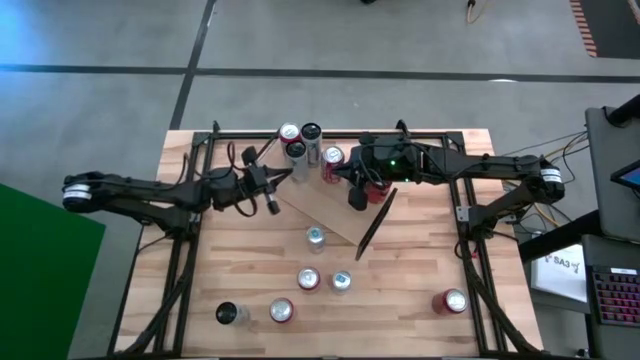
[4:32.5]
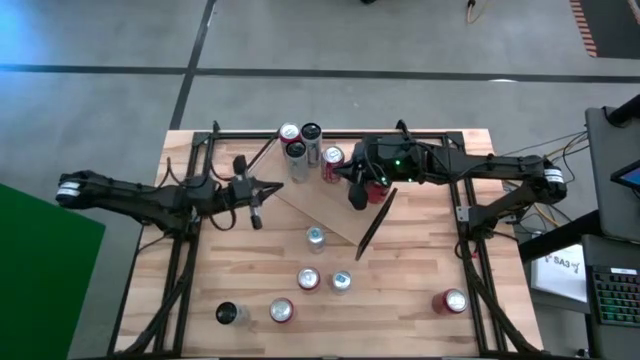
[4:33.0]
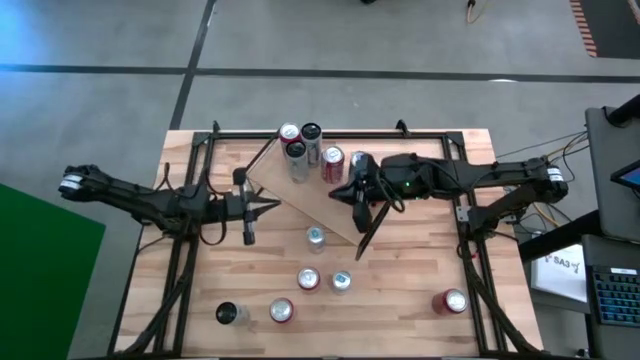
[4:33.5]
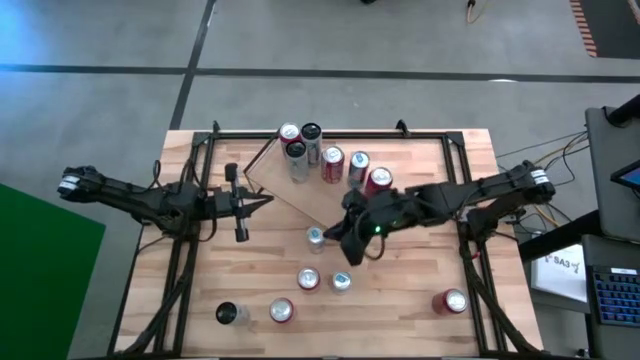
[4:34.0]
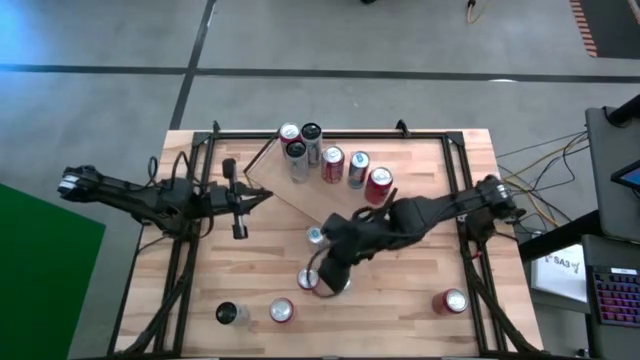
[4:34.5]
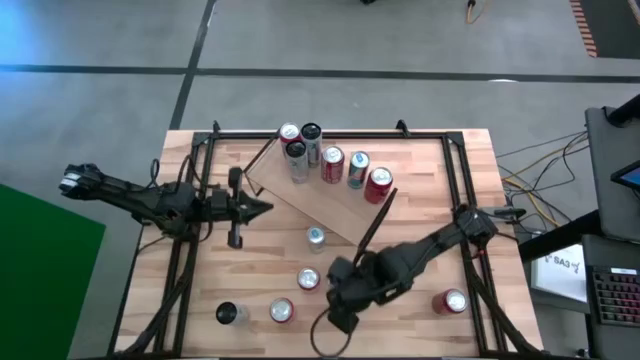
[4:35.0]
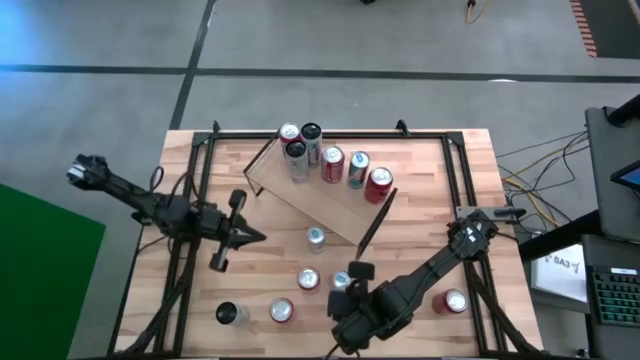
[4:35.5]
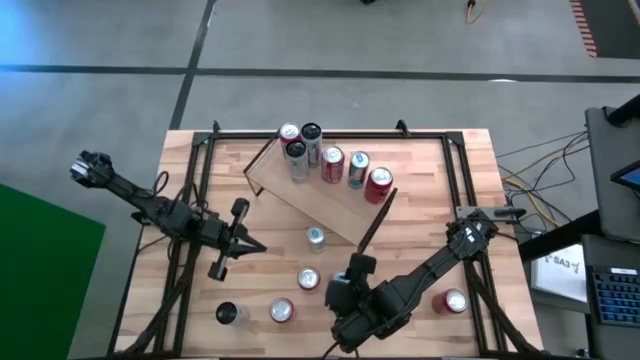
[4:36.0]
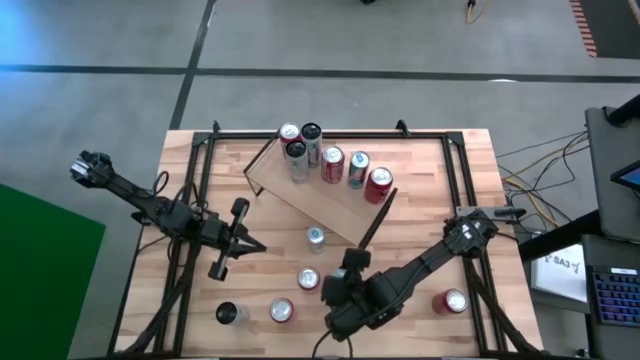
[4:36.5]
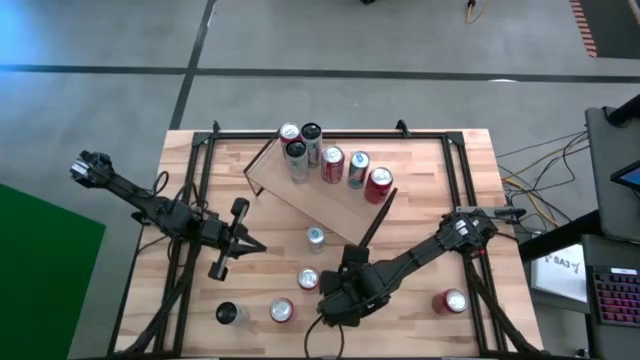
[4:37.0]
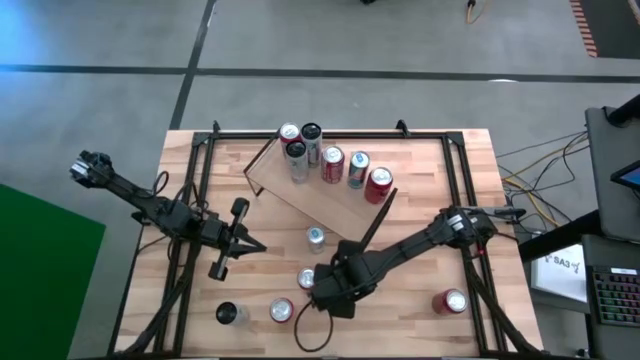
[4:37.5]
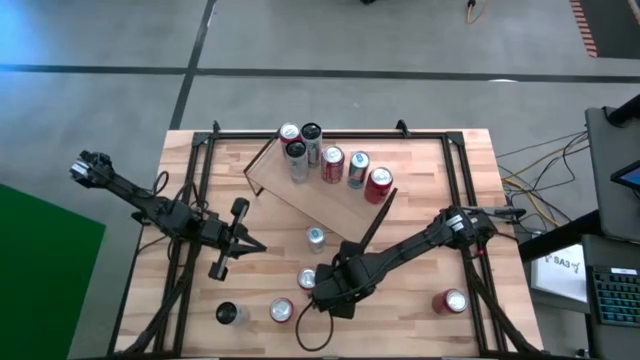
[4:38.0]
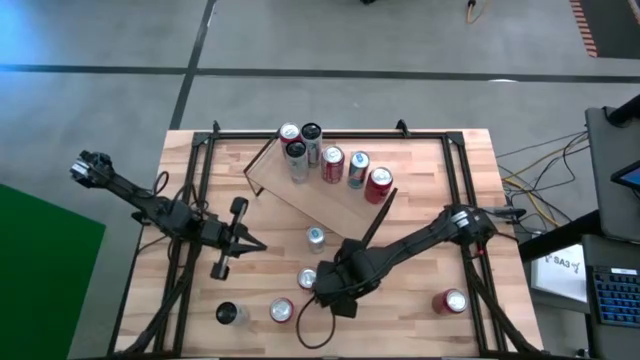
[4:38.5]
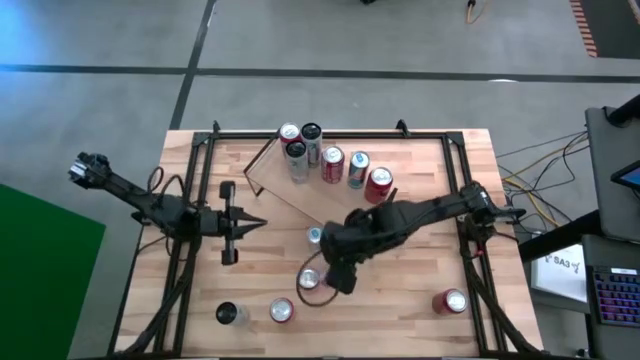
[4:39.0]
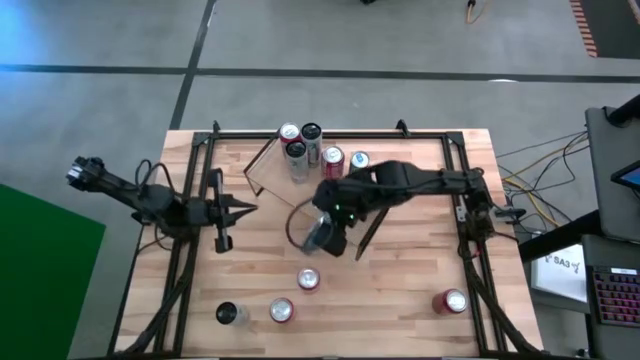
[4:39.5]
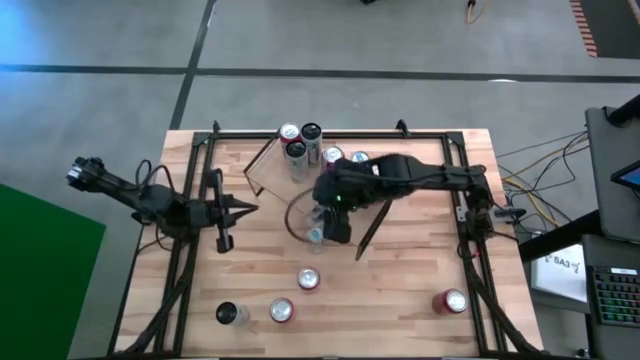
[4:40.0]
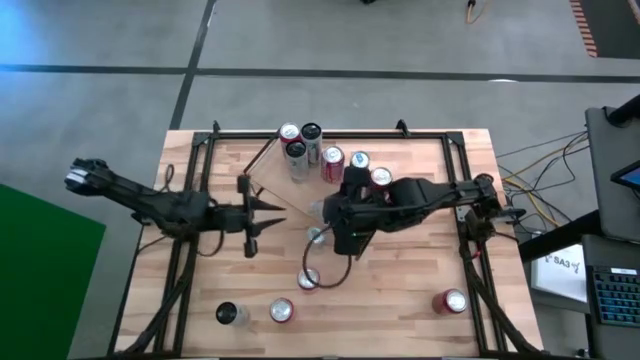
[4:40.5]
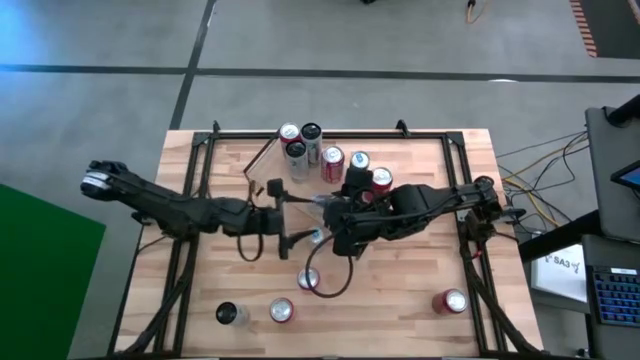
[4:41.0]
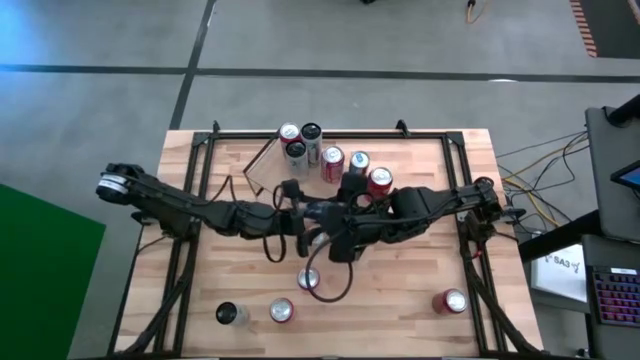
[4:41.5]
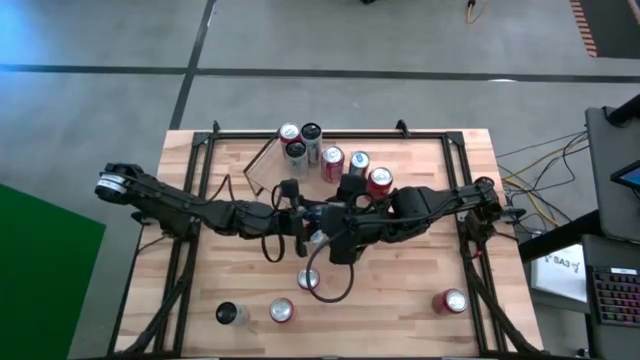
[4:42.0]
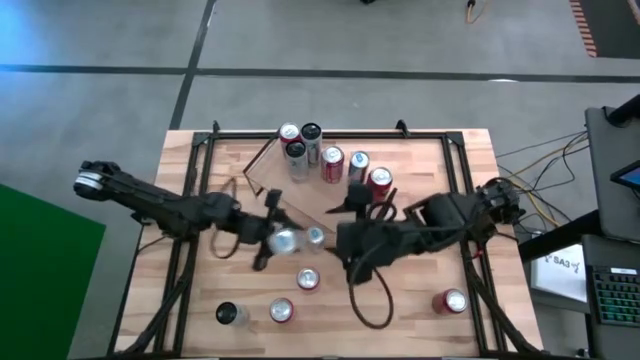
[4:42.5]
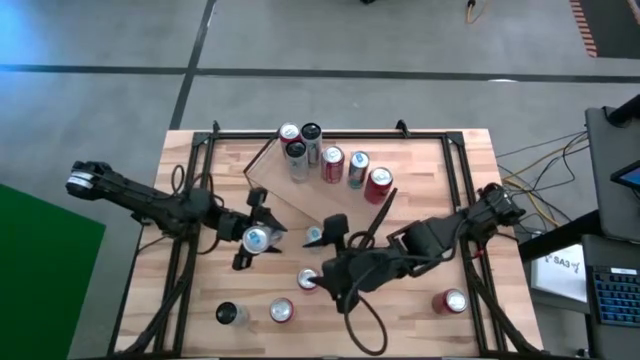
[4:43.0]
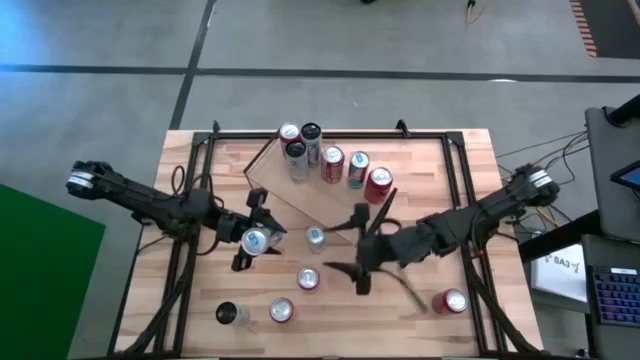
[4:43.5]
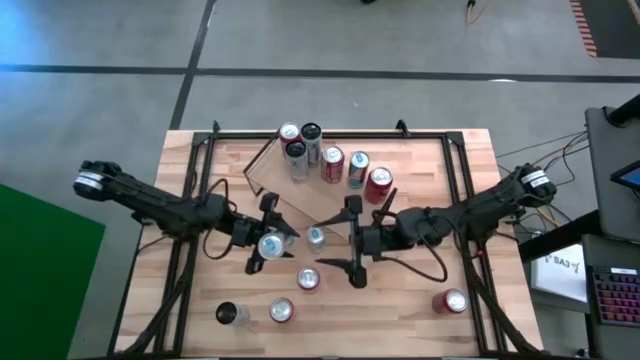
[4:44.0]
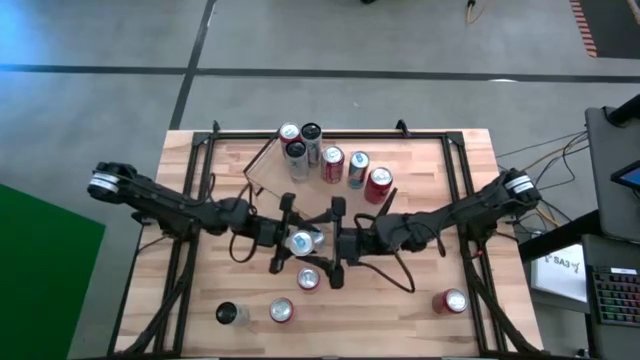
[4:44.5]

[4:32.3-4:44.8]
Task: Place canned beverage on shelf
Put the silver/blue soda can on the shelf, align with the other silver/blue soda can

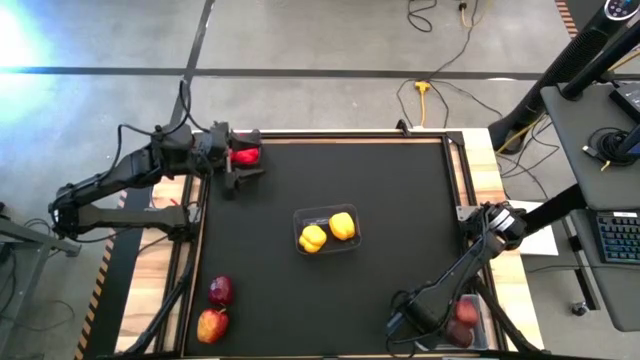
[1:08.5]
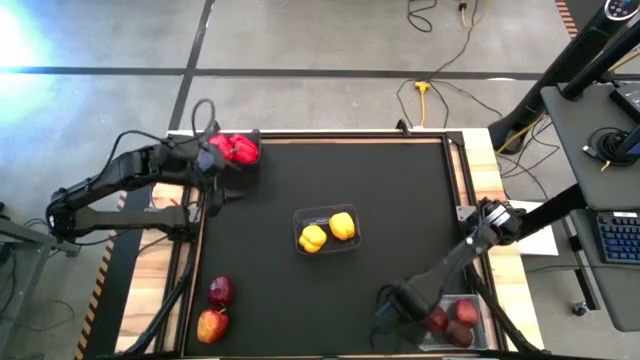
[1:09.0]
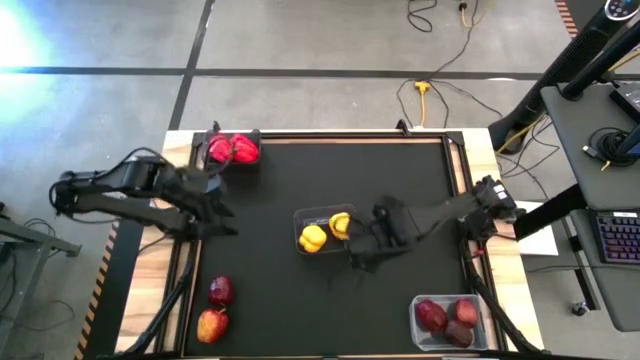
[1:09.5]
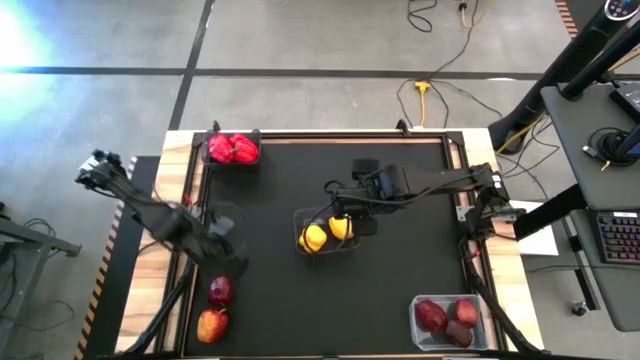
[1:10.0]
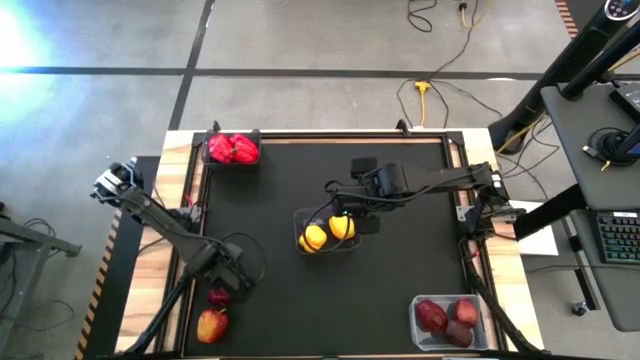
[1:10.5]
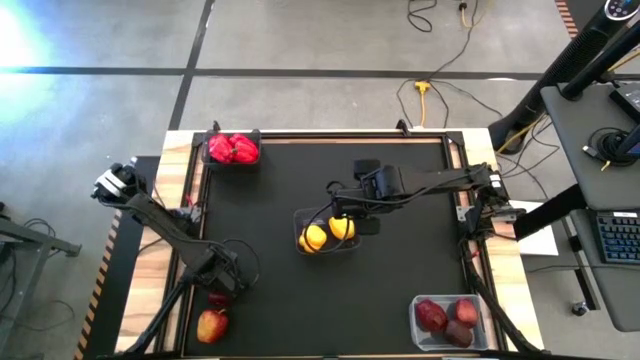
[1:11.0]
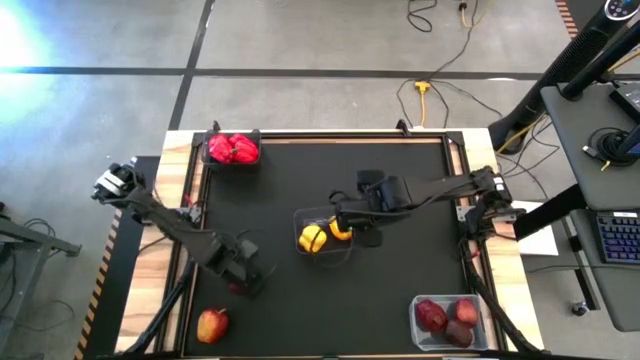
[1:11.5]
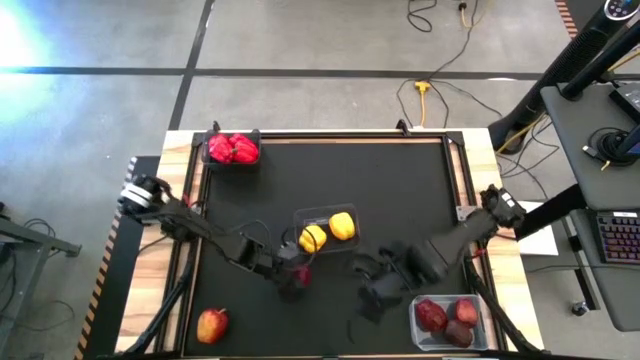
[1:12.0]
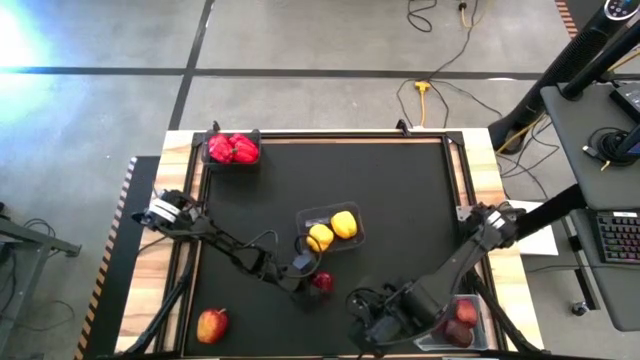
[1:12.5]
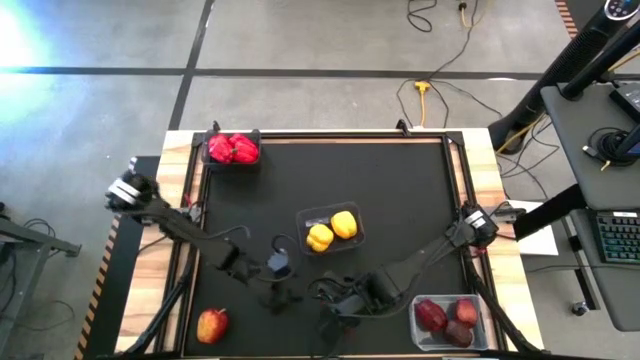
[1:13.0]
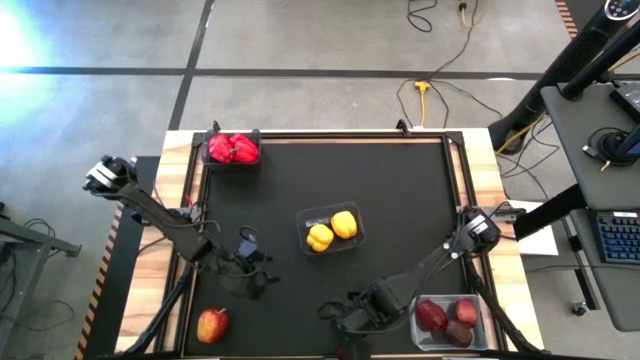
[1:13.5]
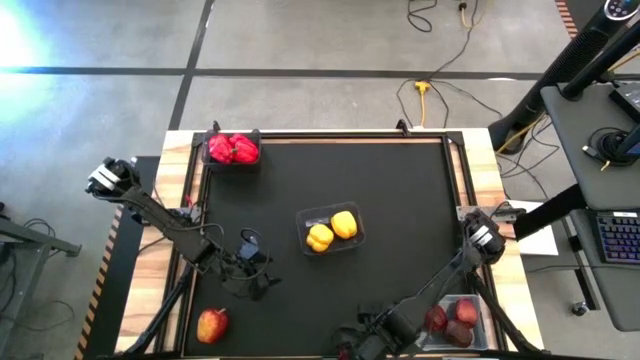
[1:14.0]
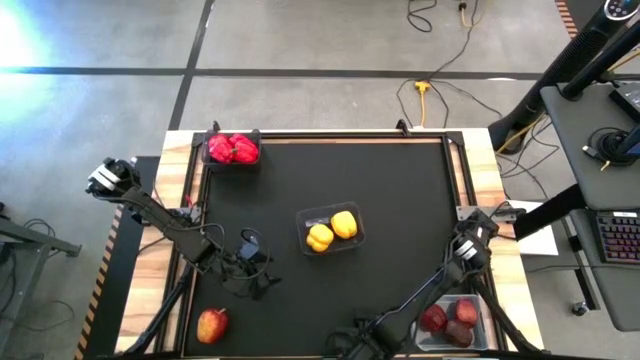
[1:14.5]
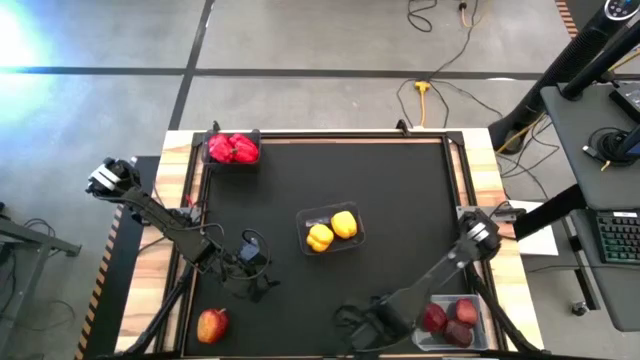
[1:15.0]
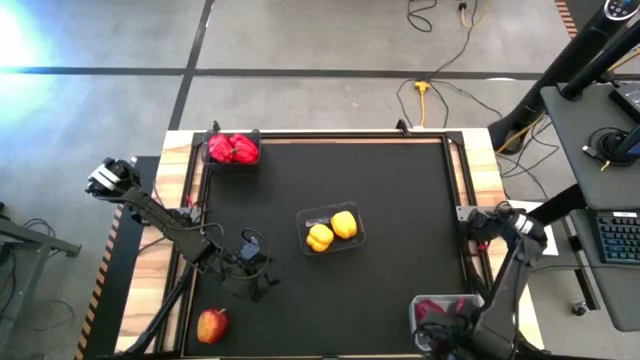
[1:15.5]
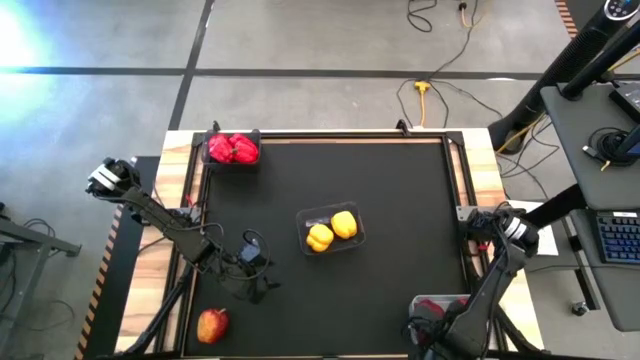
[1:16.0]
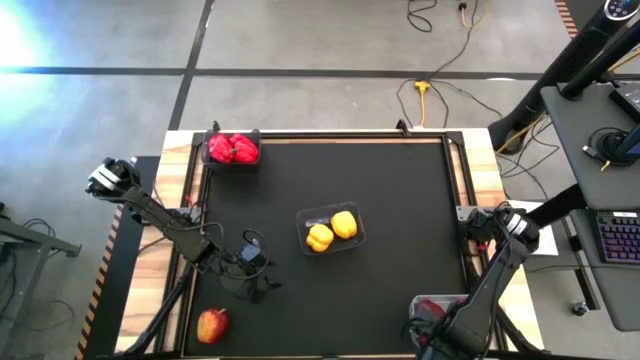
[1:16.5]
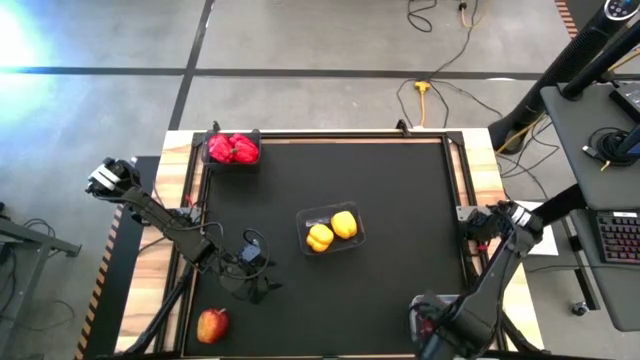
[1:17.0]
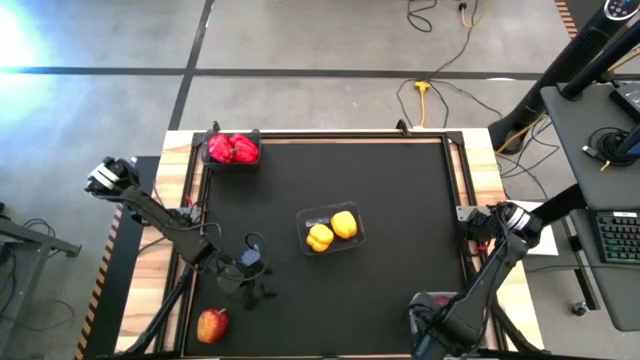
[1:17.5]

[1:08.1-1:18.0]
Task: Sort produce into baskets
Put the red apple into the transparent bin
